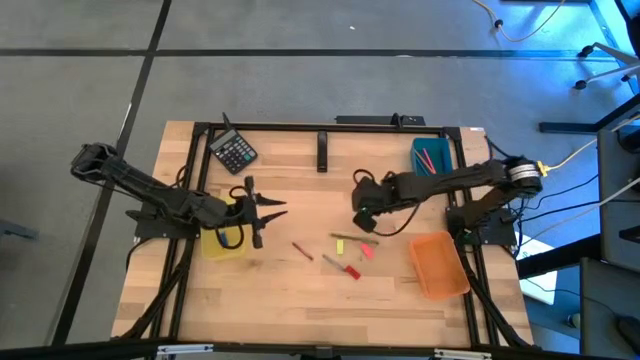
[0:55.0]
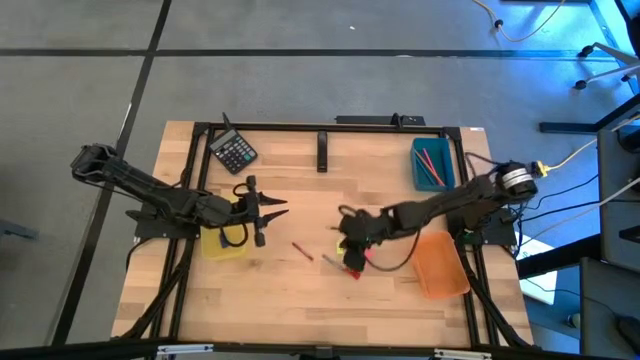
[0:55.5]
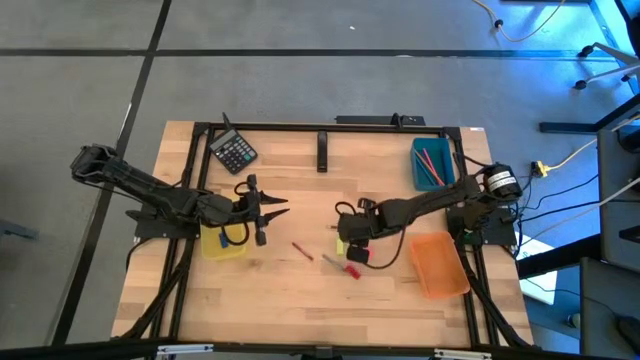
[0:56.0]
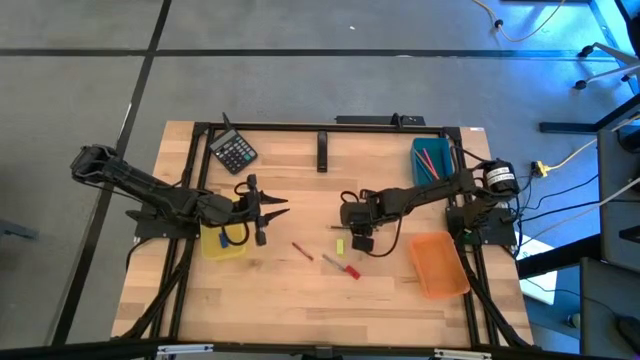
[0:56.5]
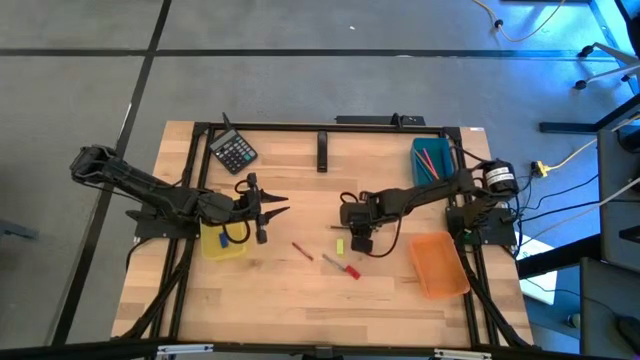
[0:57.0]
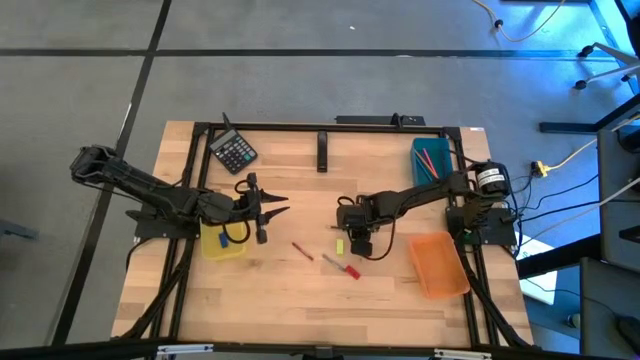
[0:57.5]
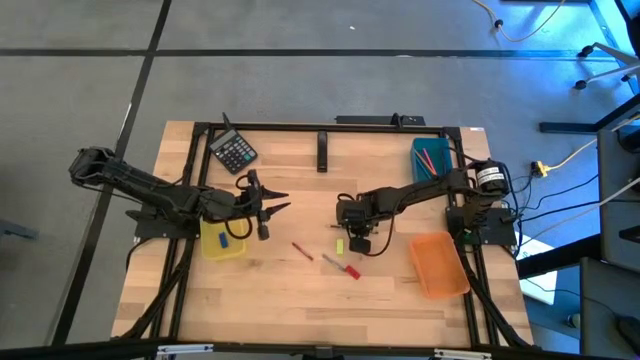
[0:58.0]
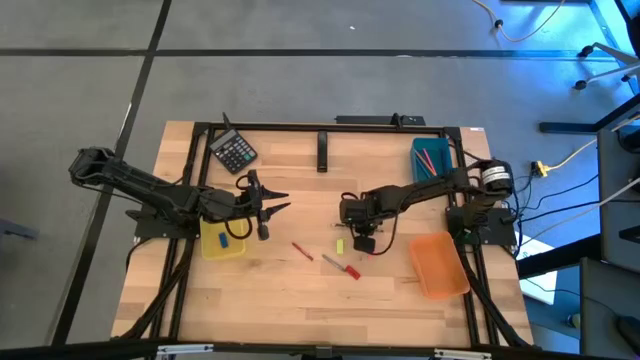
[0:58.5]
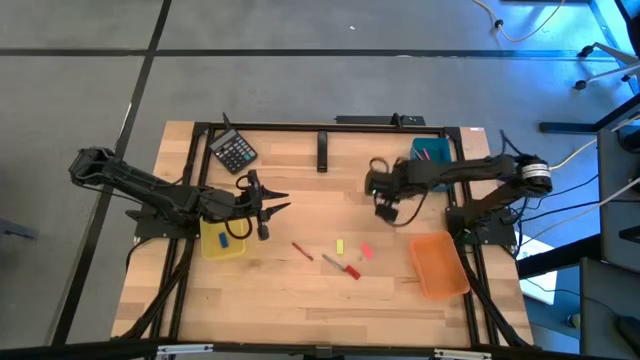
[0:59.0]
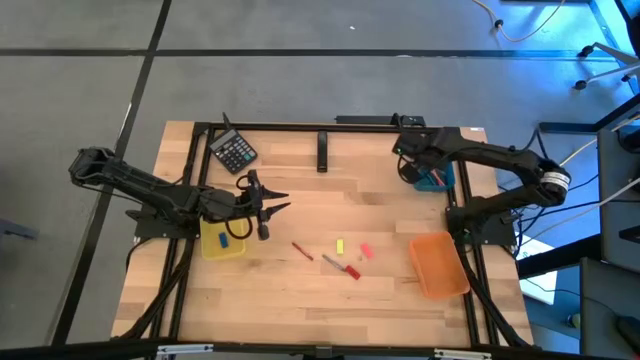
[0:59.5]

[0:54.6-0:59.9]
Task: Sort crayons/erasers/pens/pencils in bins
Put the dark blue pencil into the blue bin

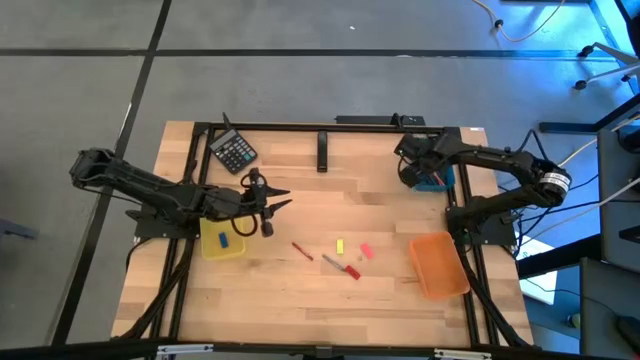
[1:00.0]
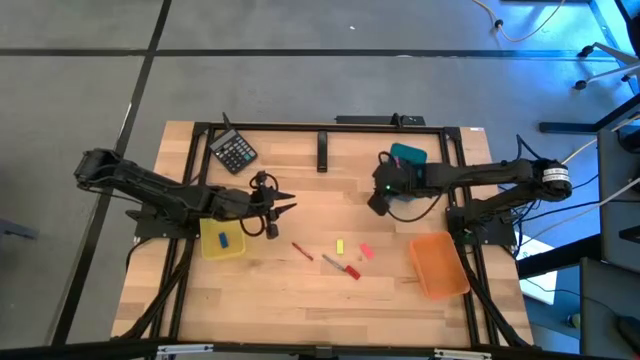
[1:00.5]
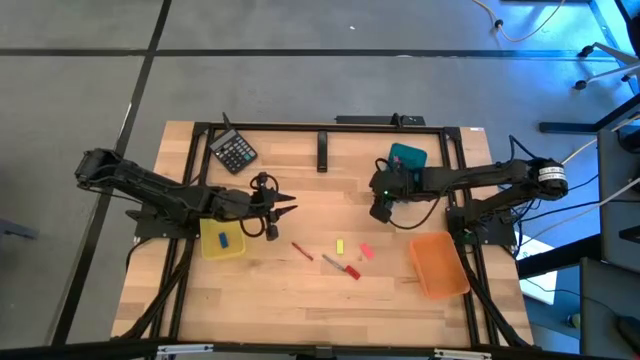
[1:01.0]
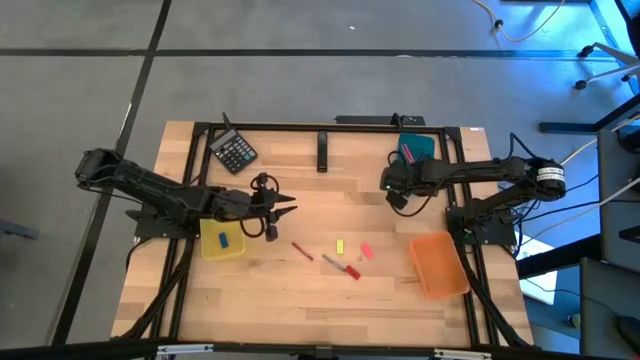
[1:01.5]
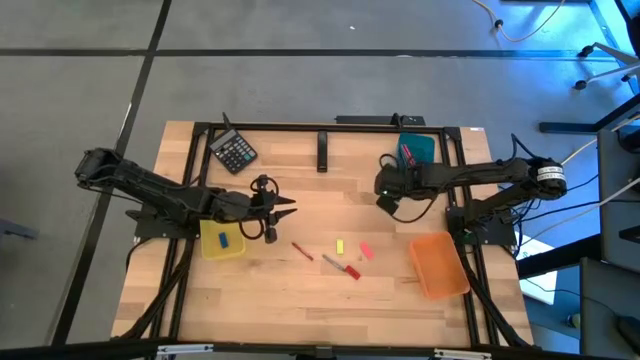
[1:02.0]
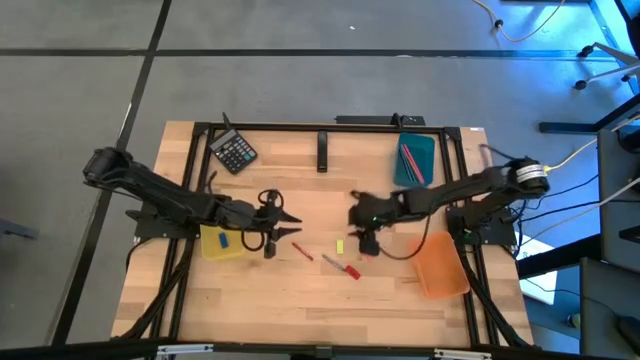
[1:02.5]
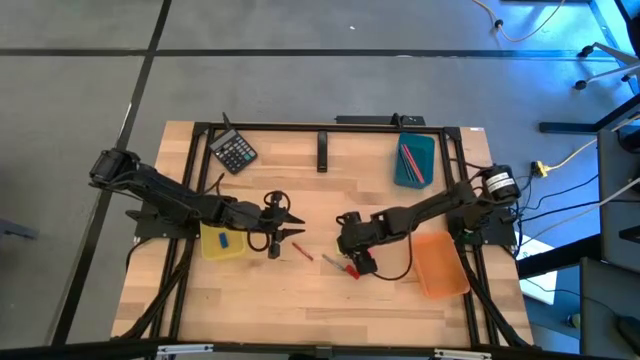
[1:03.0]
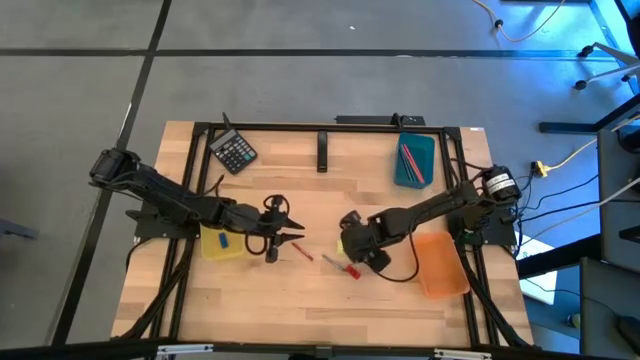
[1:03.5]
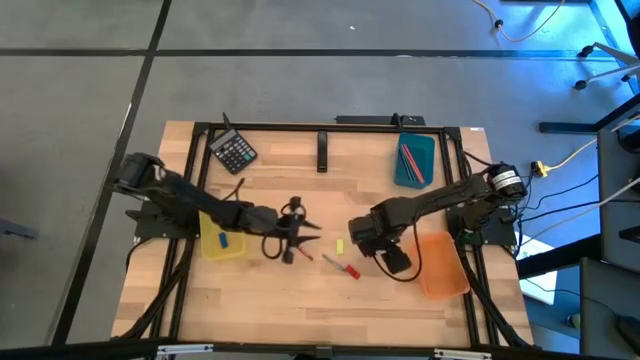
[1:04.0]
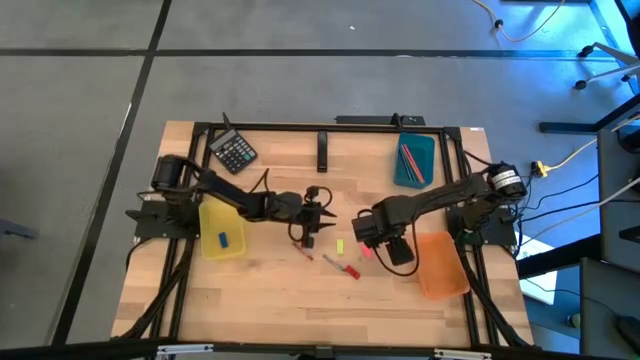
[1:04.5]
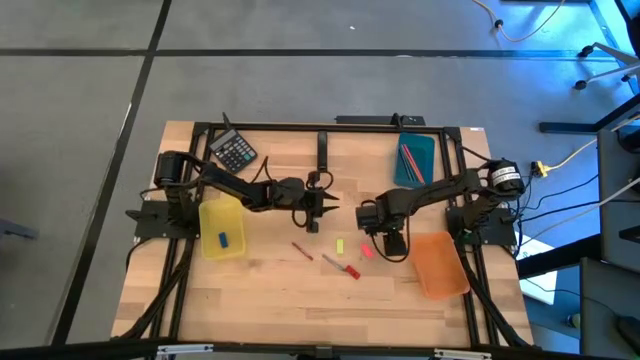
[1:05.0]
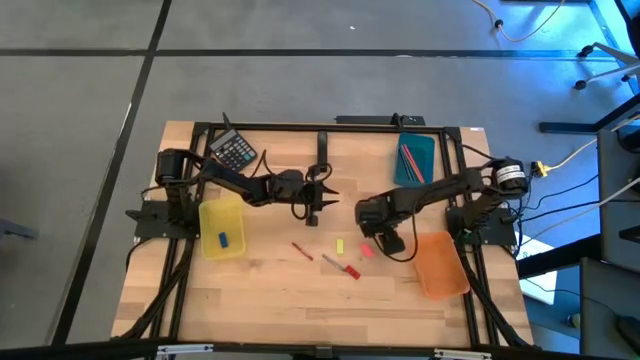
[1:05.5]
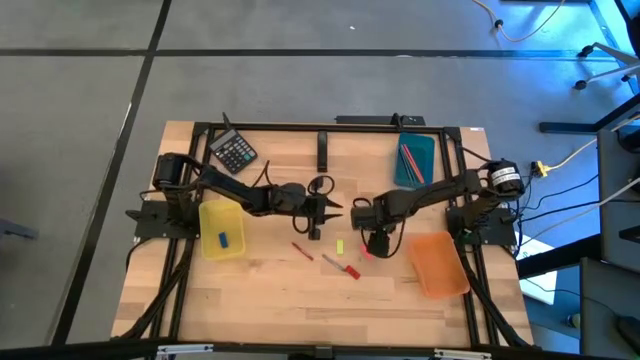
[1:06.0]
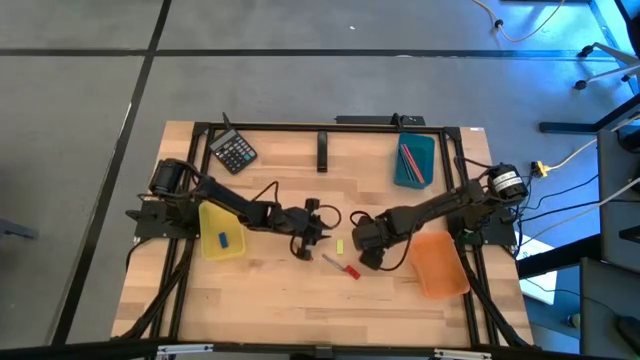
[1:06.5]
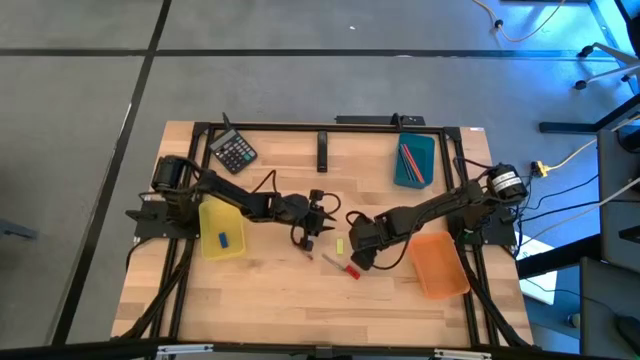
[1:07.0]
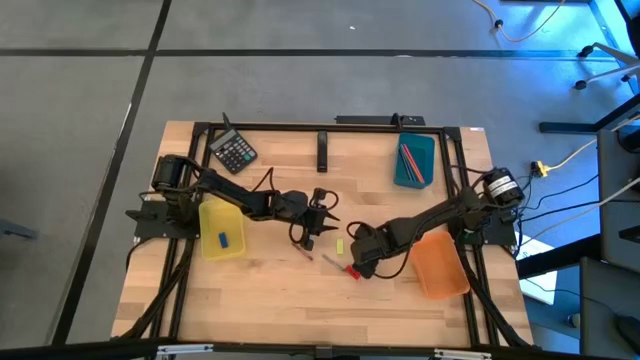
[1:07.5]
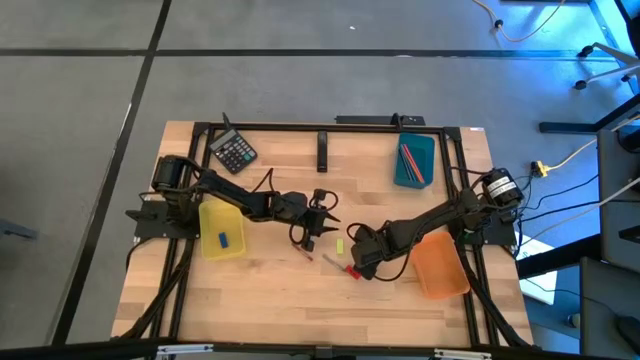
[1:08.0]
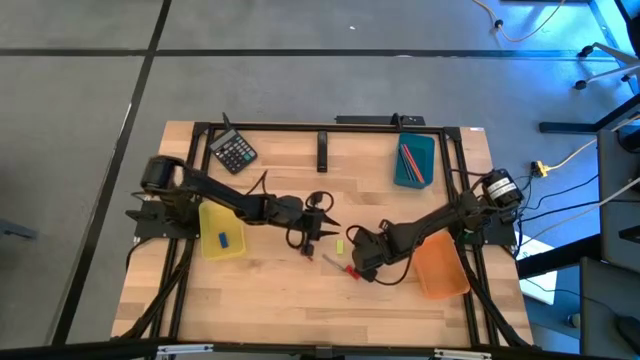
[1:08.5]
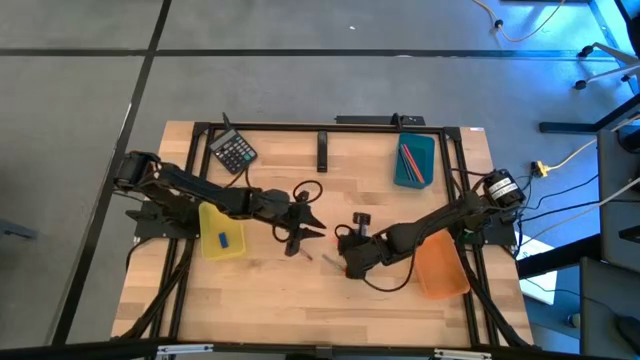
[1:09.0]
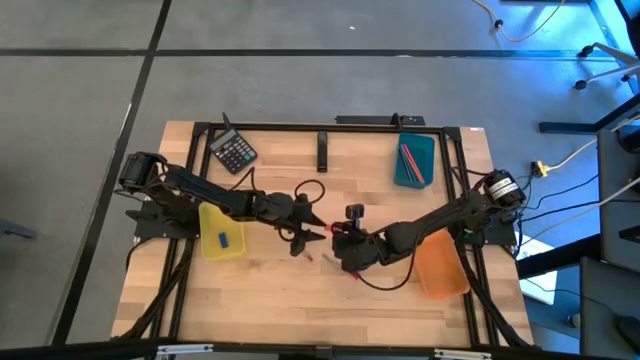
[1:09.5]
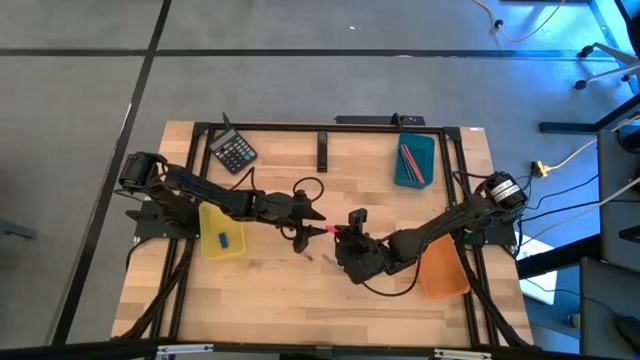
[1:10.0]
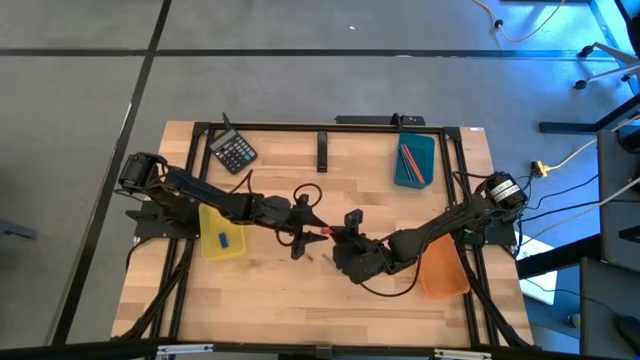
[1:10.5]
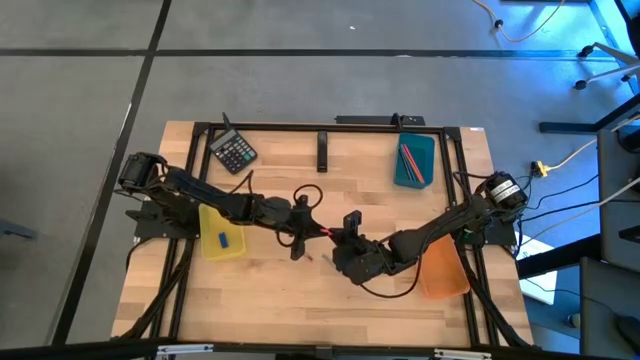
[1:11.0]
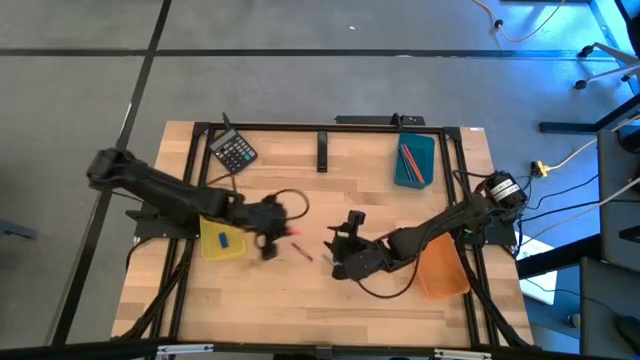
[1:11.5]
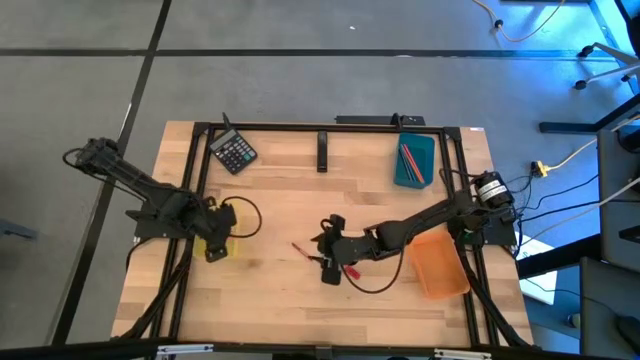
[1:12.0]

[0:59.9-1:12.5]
Put the pink eraser into the yellow bin

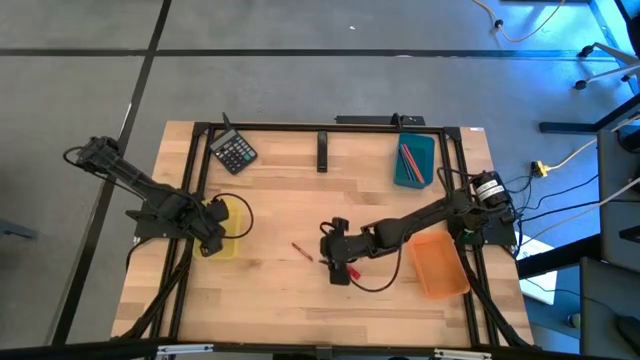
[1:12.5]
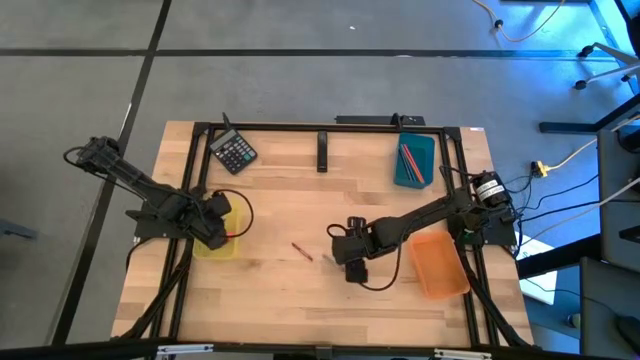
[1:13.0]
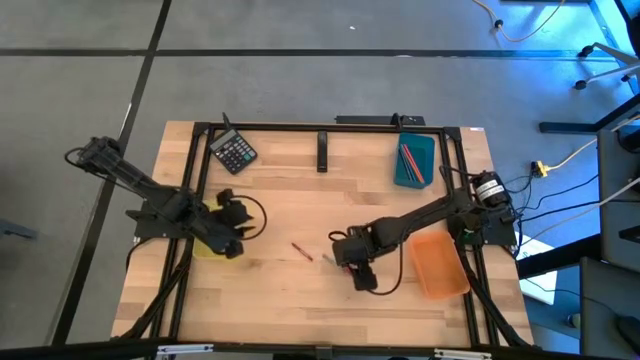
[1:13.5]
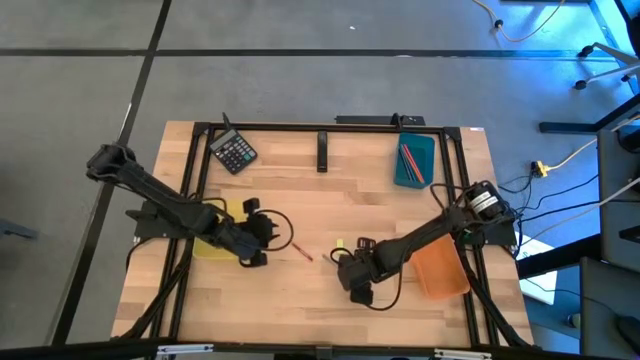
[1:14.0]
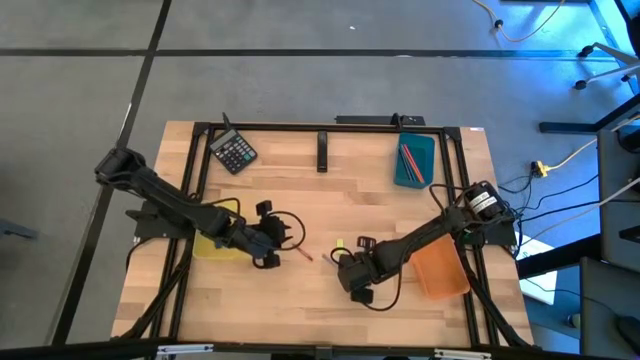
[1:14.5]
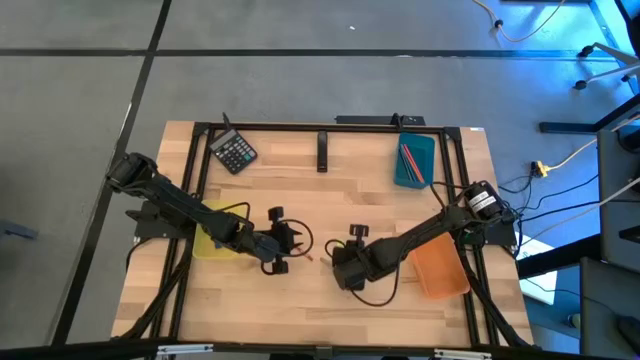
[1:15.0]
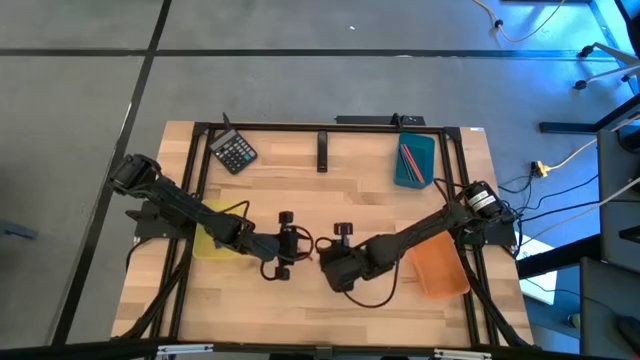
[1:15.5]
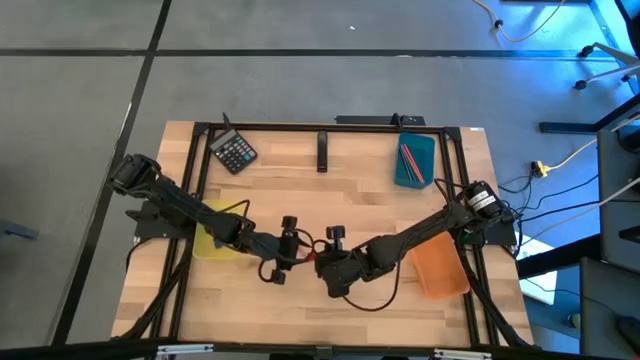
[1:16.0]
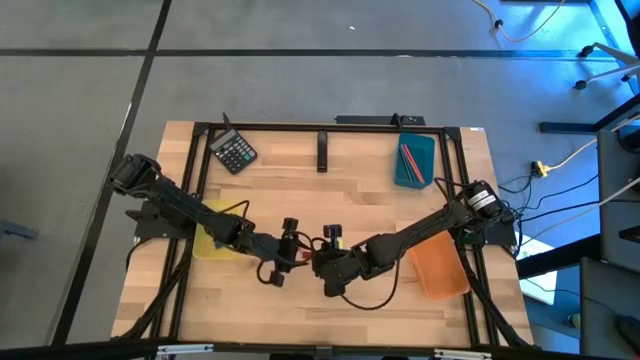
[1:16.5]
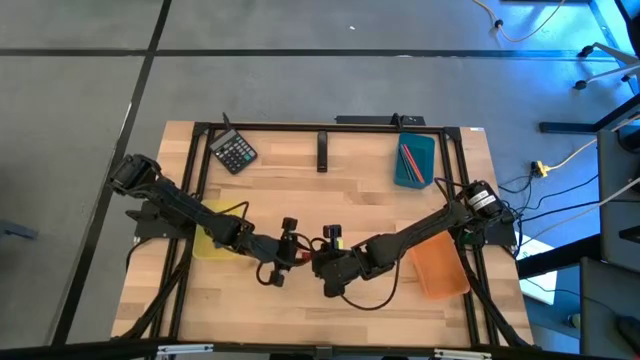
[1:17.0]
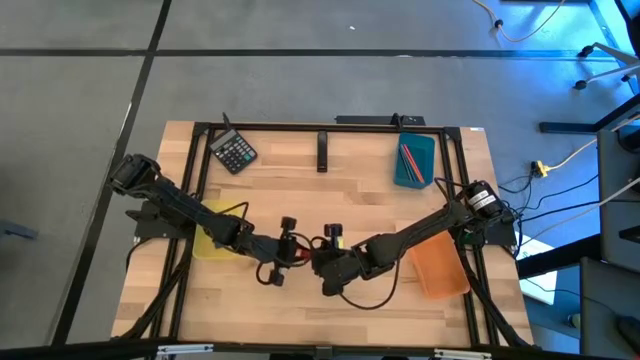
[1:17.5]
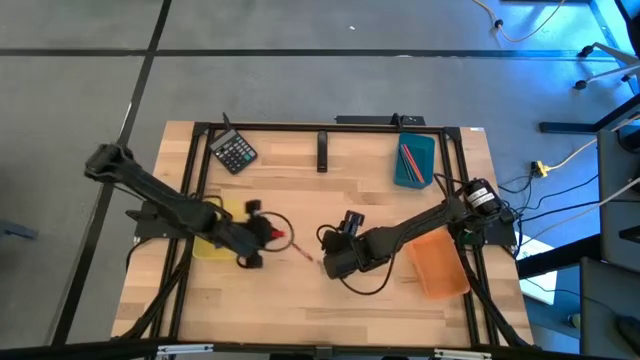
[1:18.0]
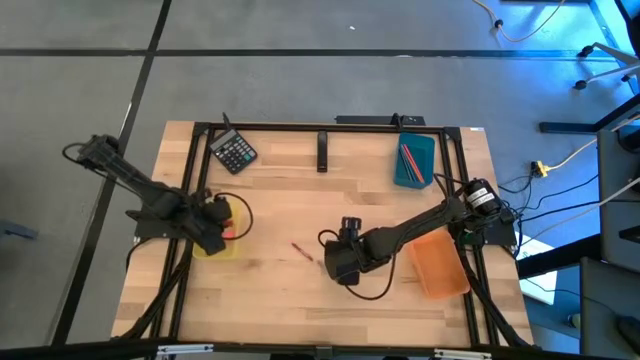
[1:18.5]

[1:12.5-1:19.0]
Put the red eraser into the yellow bin
